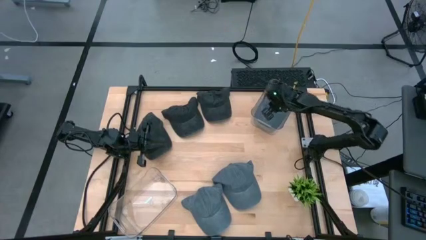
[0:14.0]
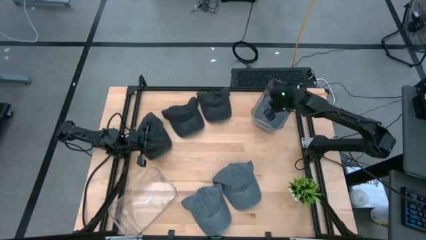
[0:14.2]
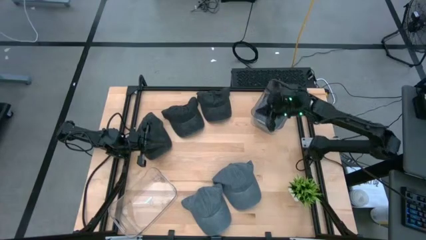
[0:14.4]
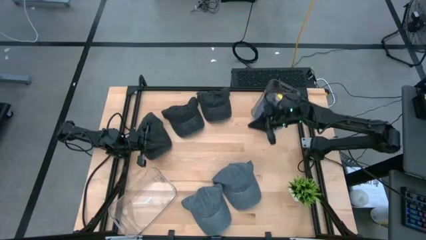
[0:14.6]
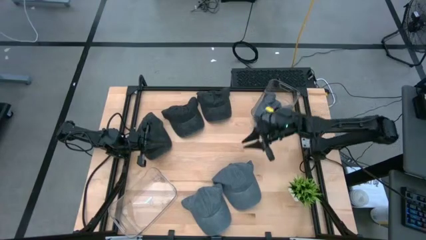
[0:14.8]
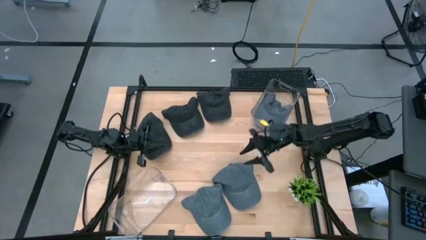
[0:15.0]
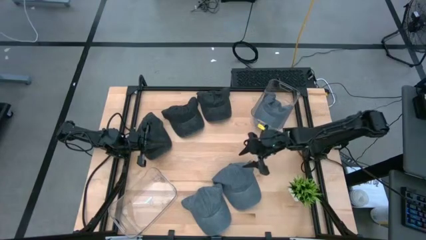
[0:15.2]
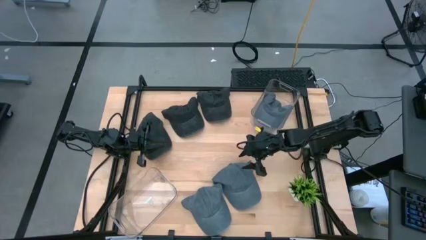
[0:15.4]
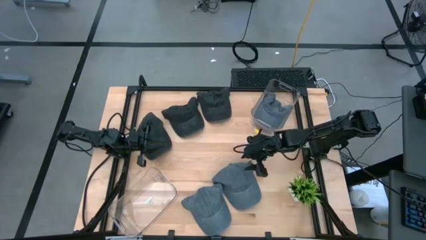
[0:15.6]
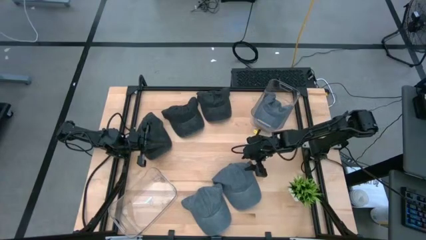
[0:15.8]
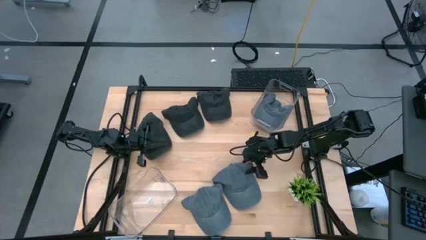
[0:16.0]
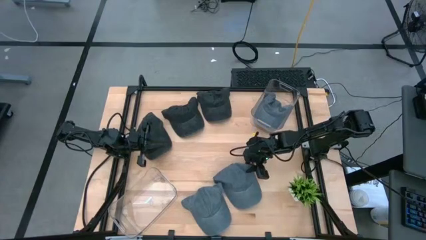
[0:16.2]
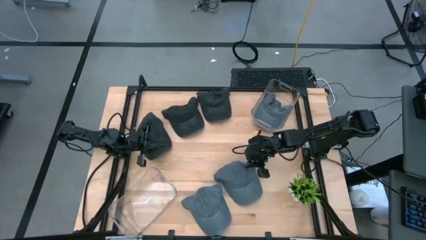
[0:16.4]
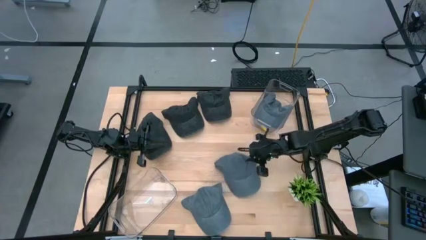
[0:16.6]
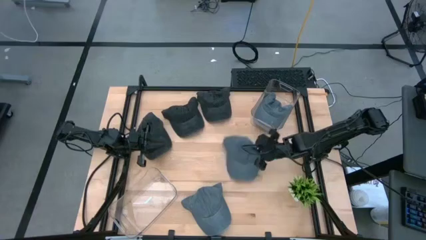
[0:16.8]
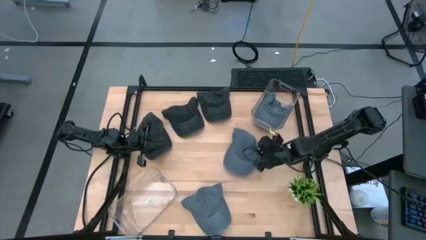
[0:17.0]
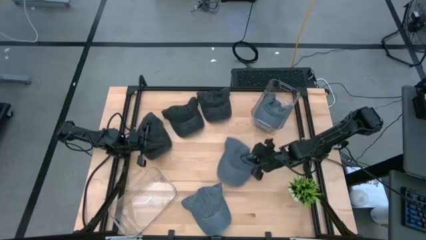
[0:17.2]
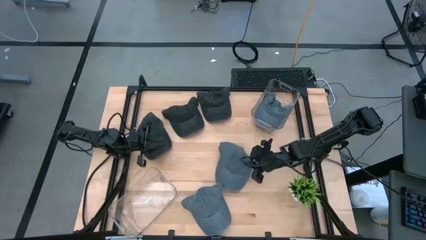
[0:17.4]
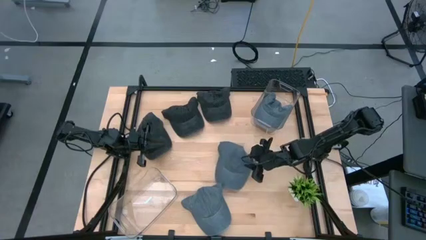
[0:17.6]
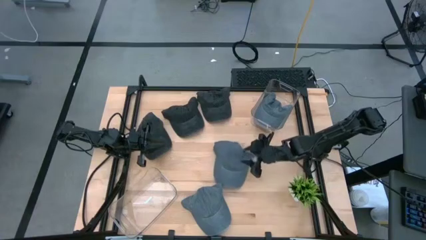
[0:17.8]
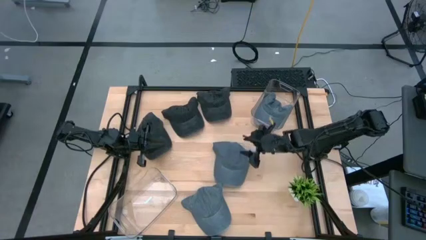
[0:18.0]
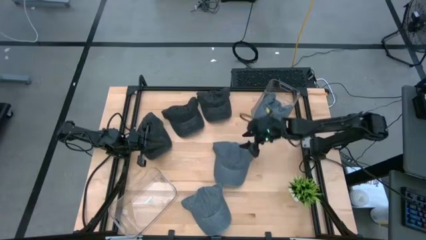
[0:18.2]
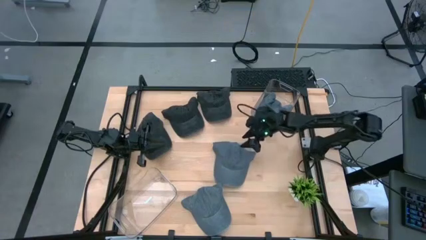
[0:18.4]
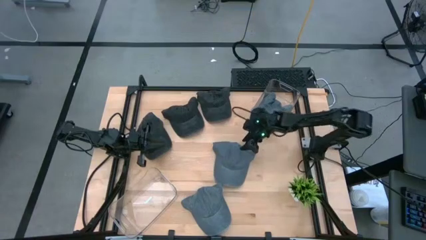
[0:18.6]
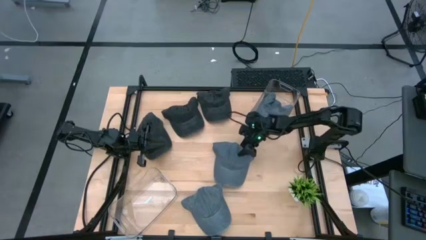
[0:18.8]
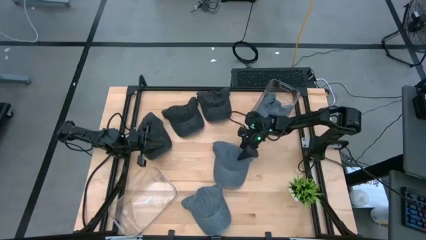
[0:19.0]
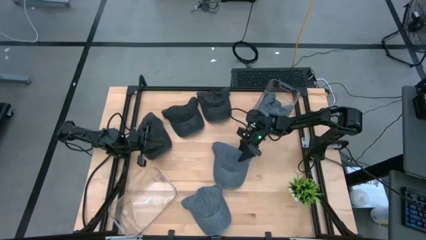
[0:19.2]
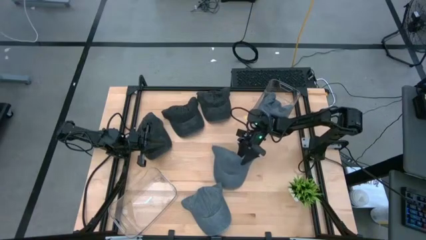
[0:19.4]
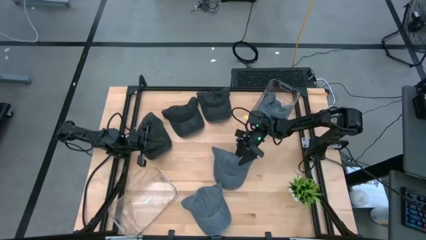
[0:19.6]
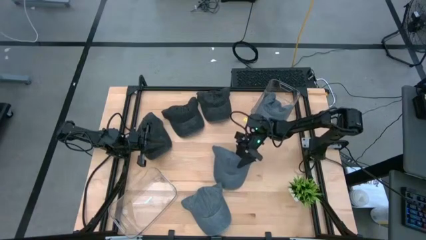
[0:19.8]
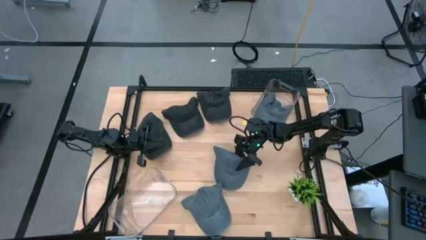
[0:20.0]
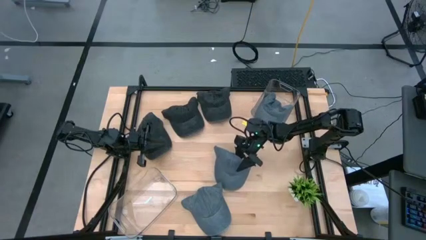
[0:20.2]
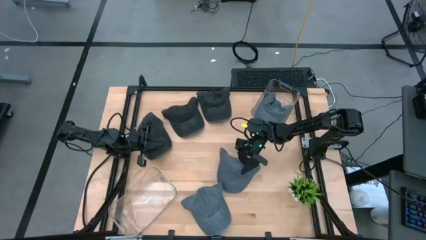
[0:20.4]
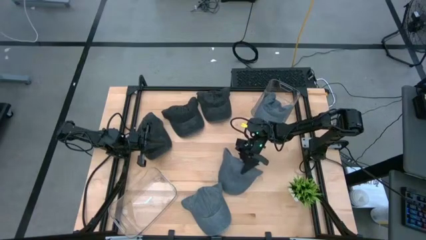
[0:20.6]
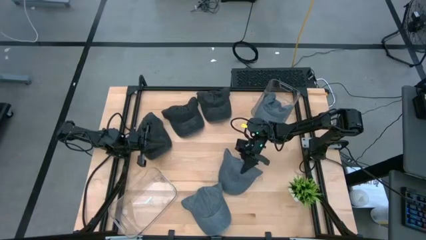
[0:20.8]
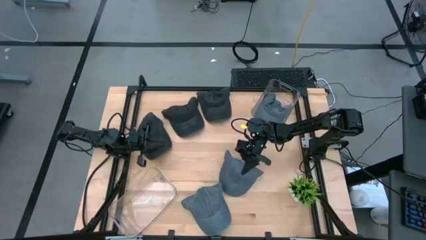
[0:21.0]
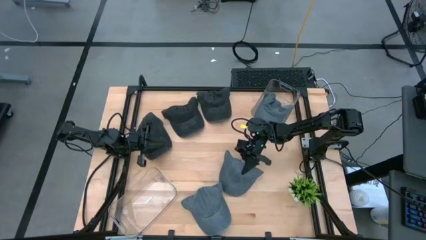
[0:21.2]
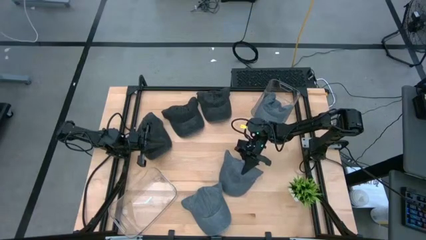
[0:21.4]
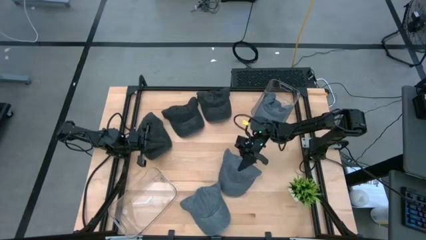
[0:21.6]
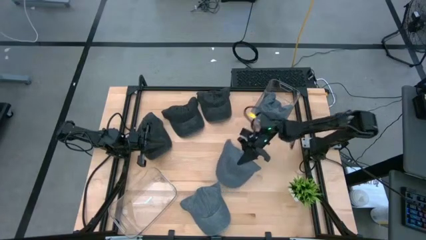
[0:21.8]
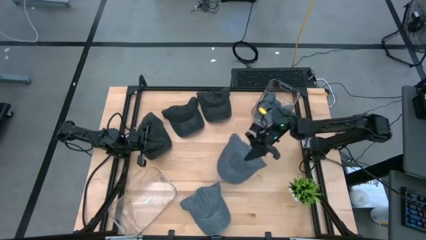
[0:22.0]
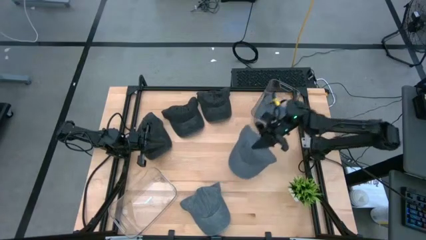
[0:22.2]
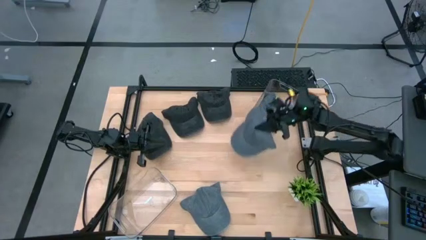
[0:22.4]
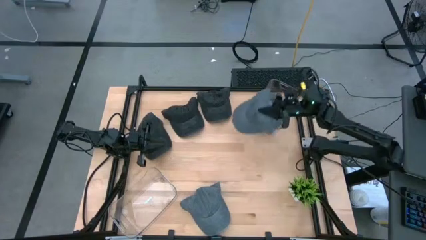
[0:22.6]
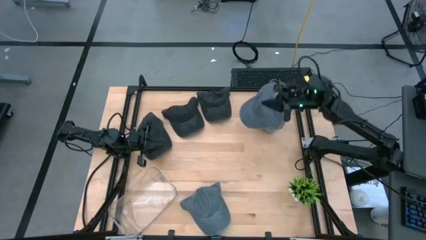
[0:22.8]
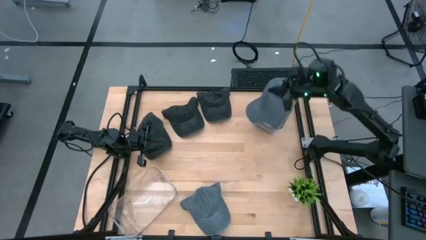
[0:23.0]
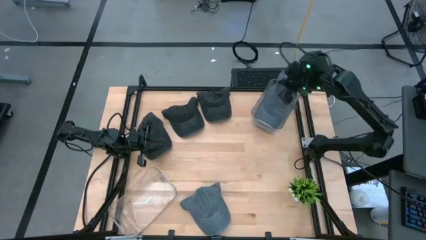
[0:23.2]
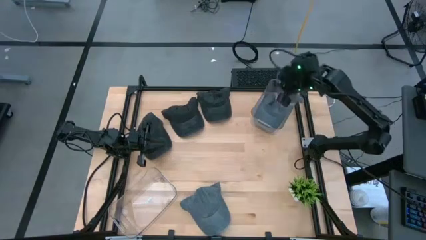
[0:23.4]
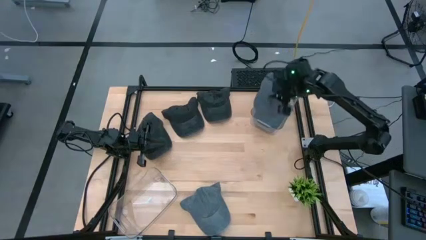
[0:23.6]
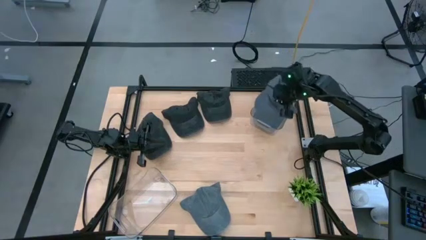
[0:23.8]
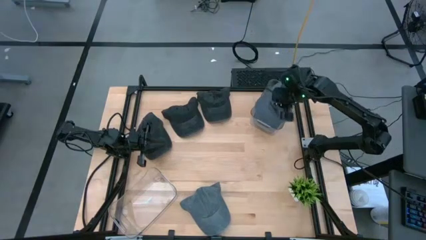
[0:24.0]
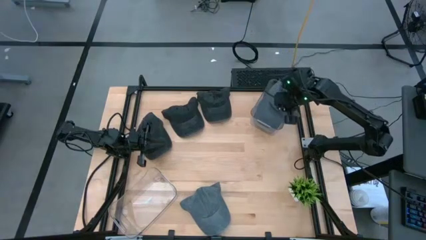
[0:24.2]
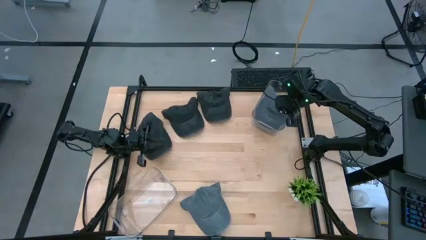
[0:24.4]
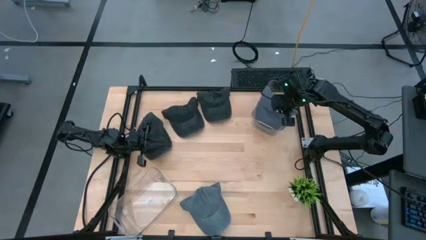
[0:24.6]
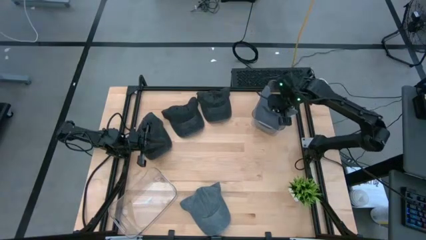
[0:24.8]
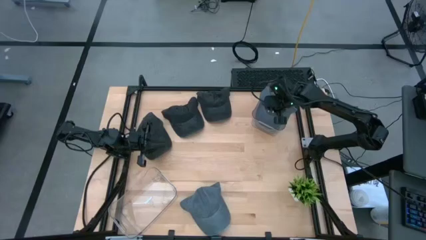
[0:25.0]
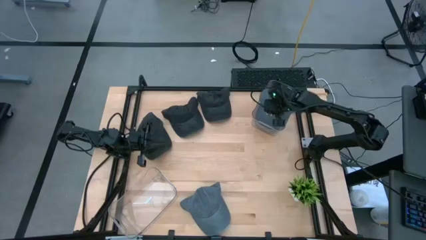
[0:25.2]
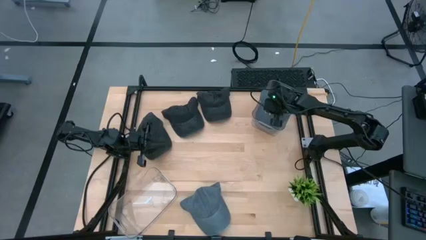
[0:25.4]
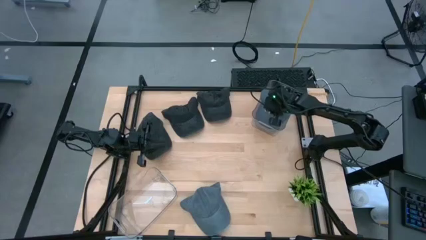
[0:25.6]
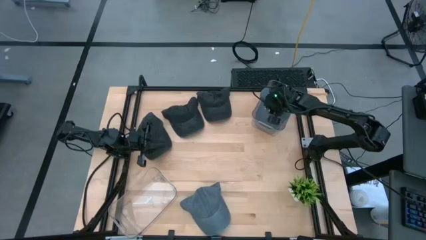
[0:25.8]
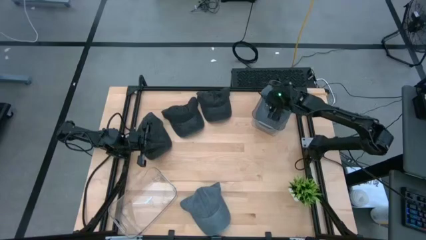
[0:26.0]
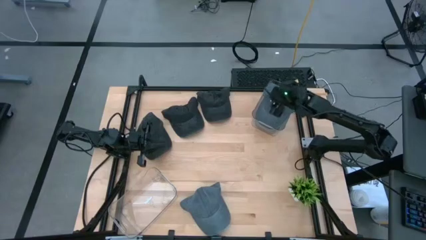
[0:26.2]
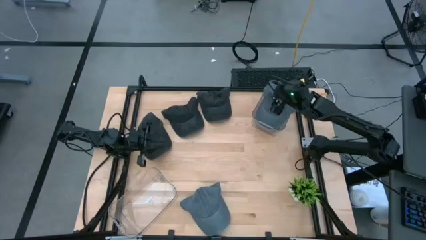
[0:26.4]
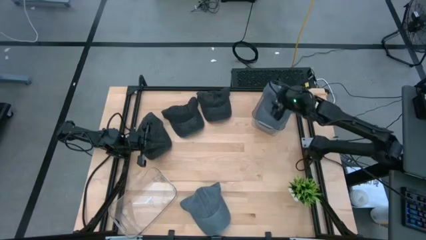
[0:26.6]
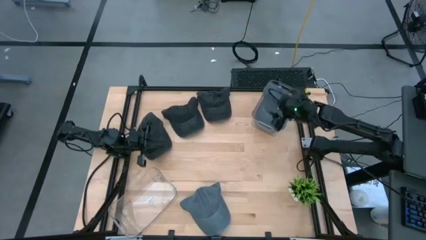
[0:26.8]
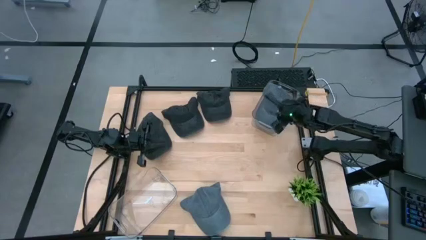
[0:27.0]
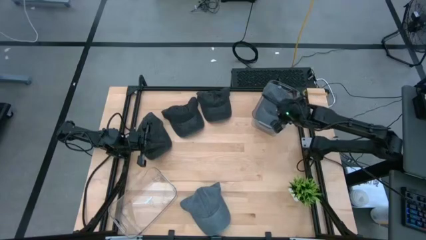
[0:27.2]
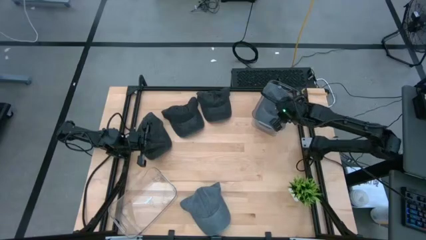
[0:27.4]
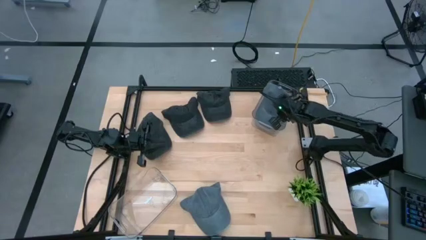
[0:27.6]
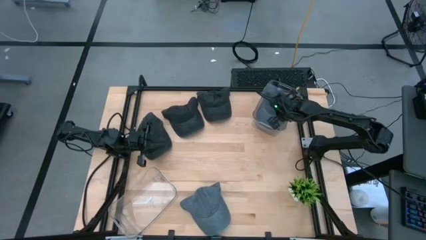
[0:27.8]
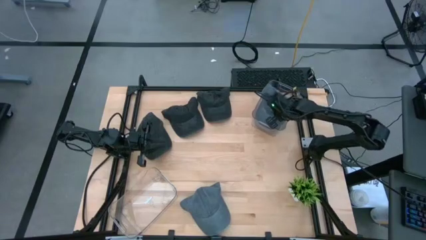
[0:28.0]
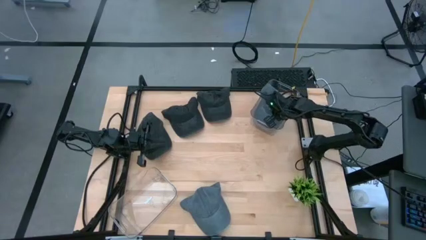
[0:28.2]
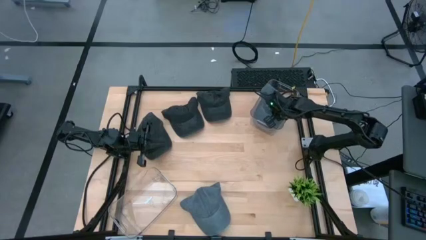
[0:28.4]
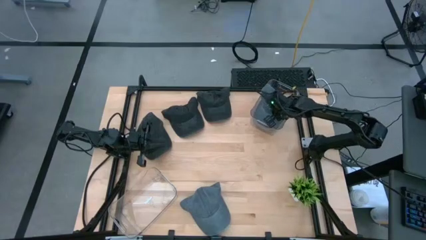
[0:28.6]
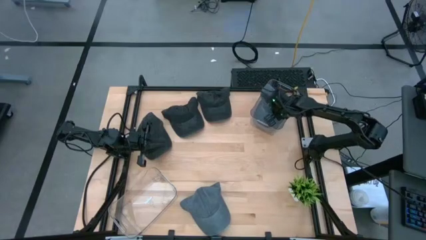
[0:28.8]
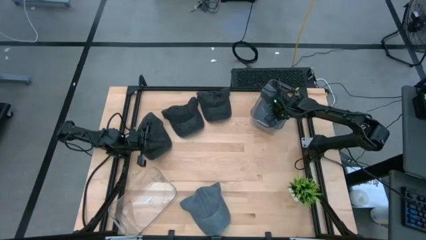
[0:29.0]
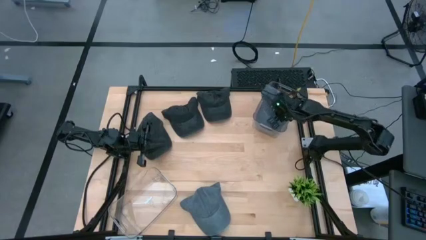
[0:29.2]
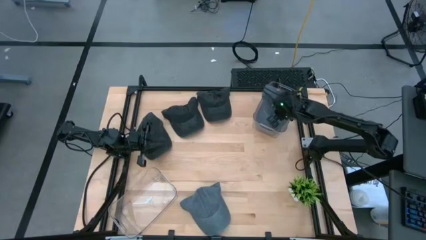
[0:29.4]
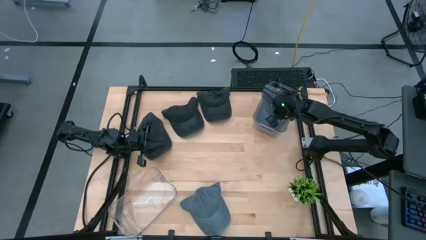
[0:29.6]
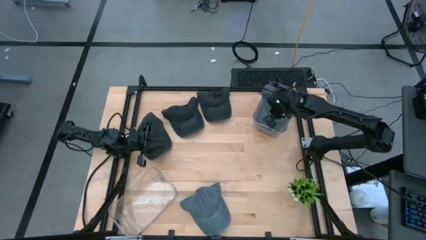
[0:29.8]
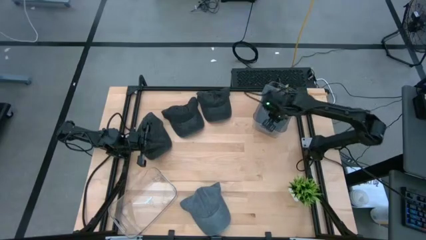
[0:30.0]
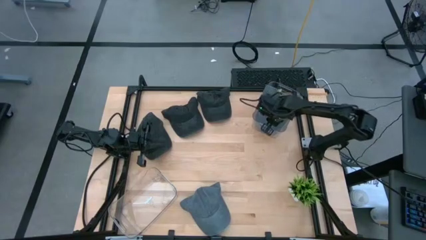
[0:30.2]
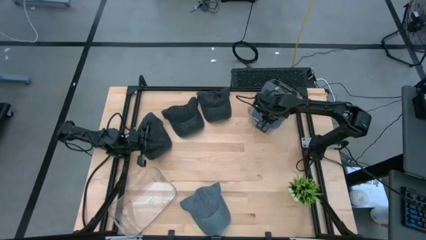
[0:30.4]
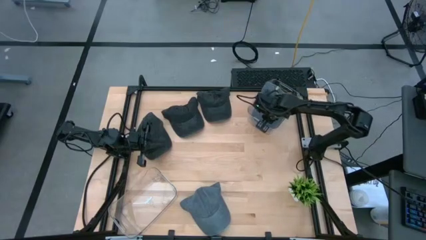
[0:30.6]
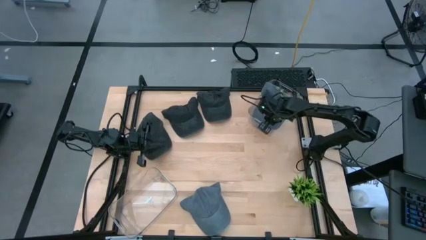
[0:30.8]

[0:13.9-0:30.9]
Task: Pick & Place hat
Put the top gray cap into the top transparent bin
